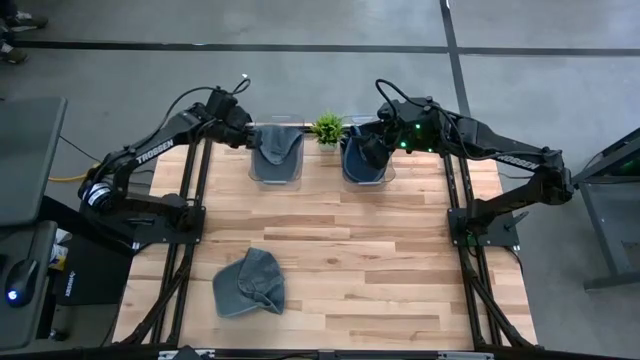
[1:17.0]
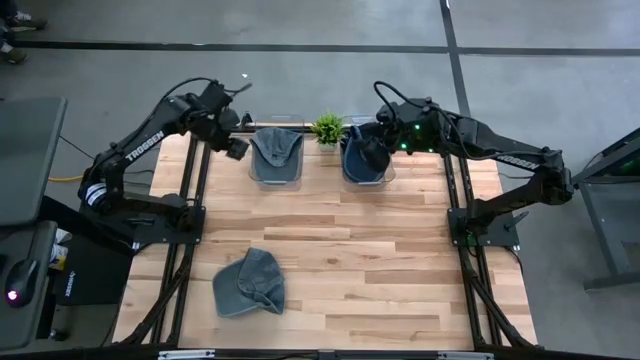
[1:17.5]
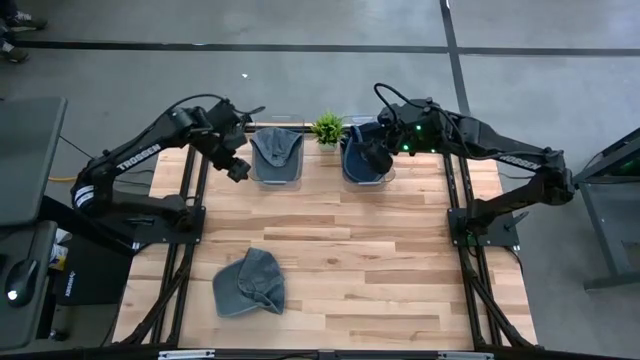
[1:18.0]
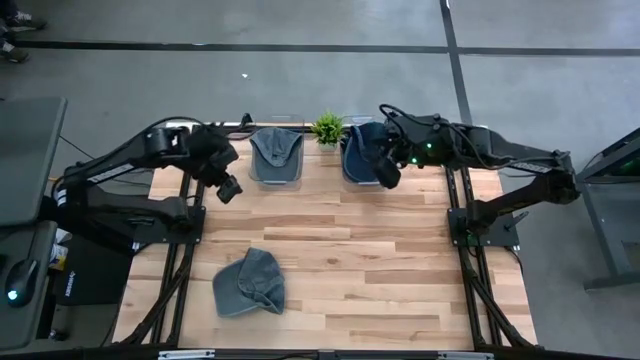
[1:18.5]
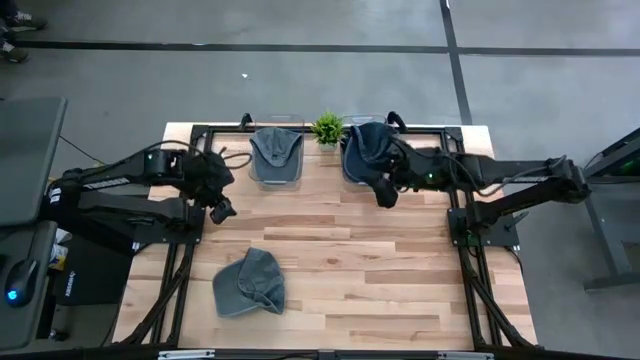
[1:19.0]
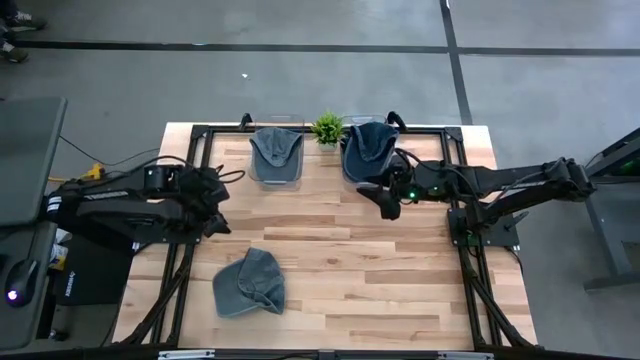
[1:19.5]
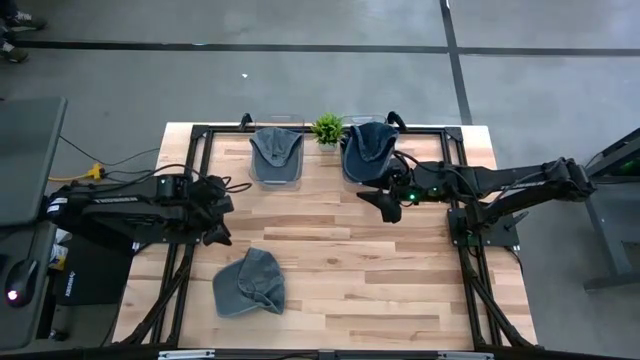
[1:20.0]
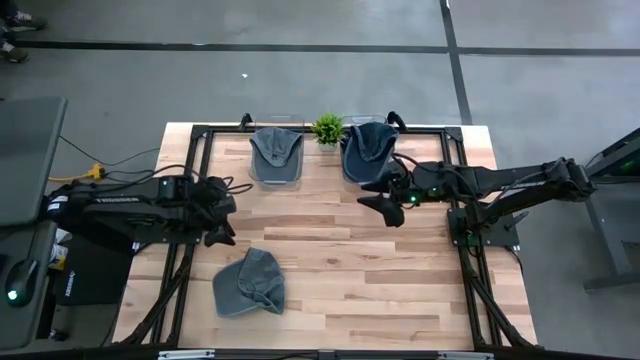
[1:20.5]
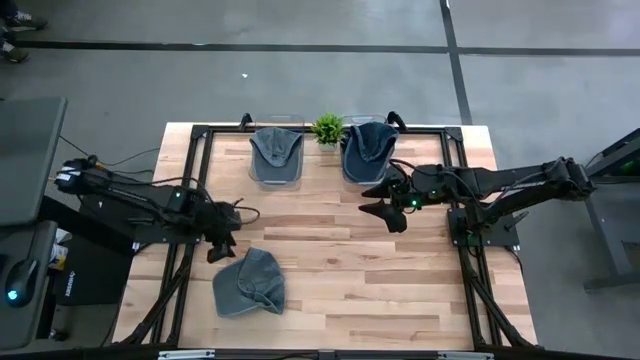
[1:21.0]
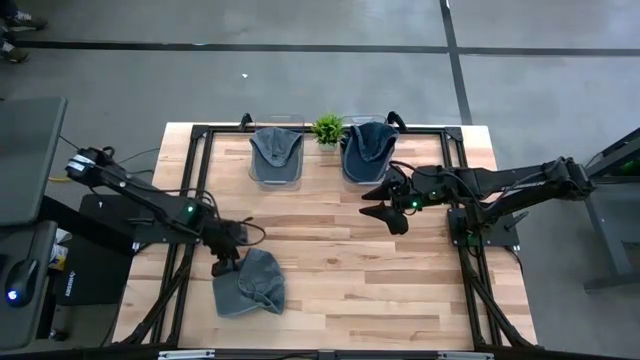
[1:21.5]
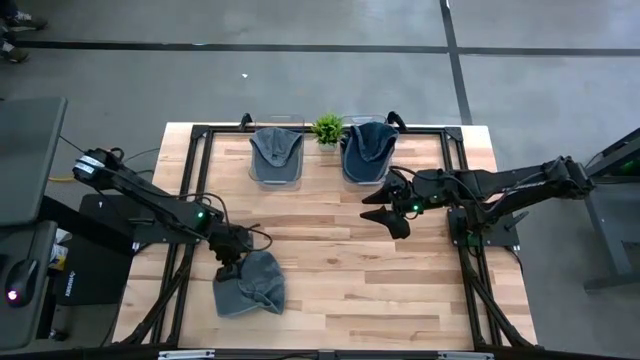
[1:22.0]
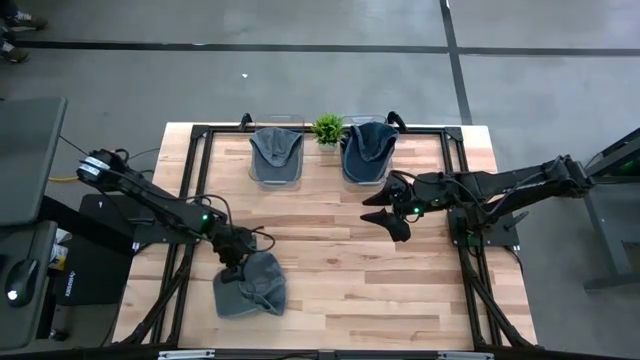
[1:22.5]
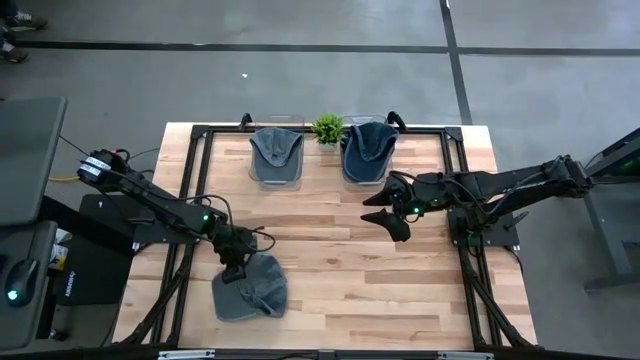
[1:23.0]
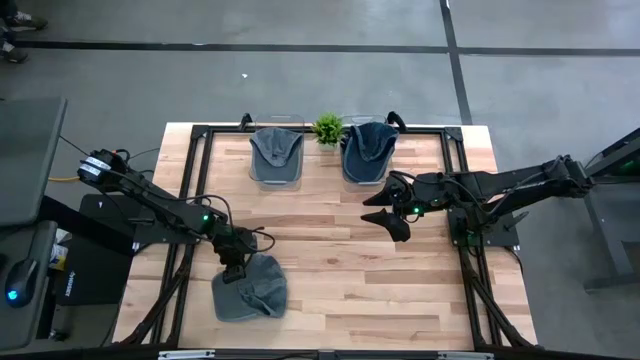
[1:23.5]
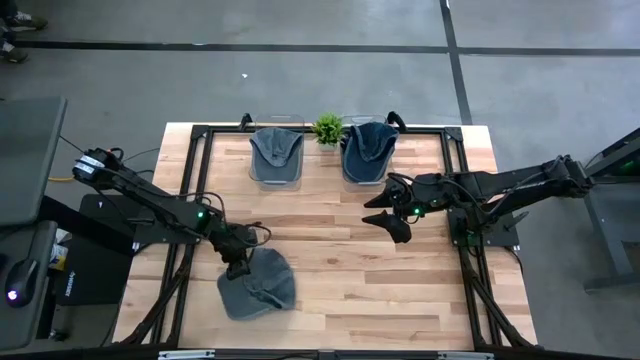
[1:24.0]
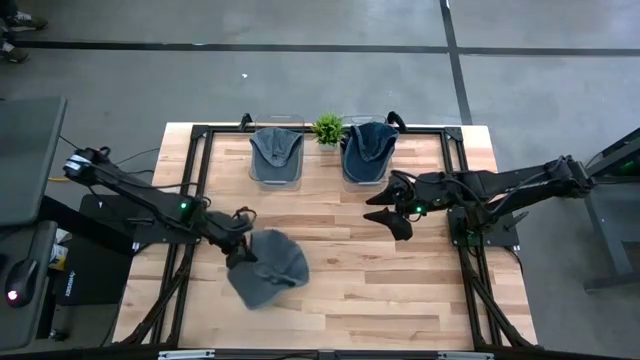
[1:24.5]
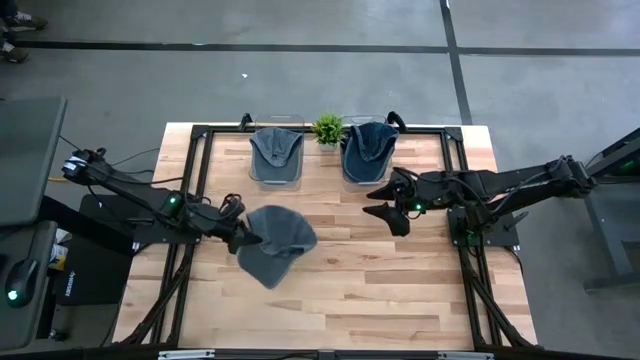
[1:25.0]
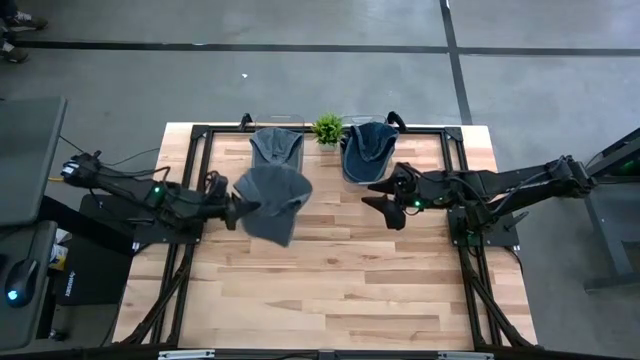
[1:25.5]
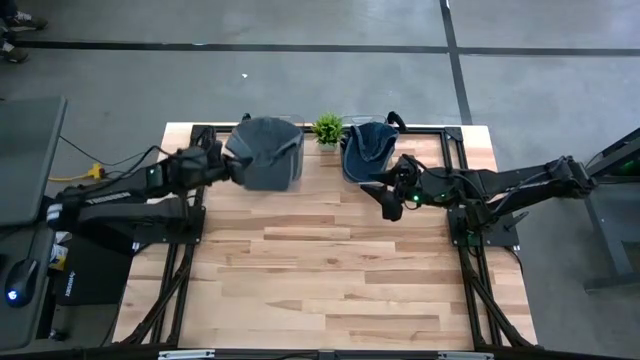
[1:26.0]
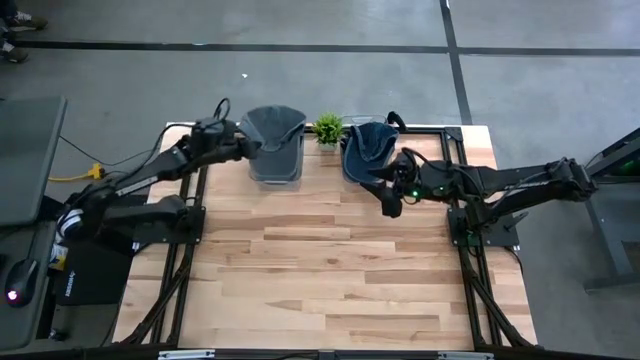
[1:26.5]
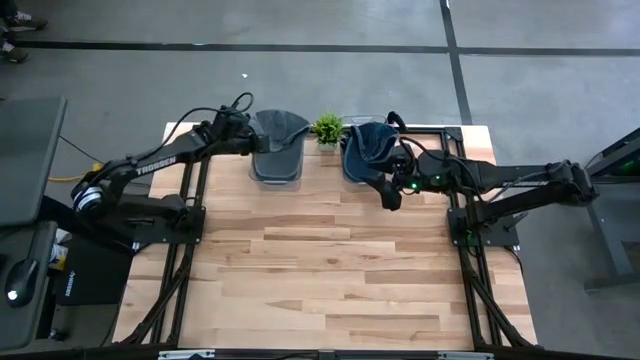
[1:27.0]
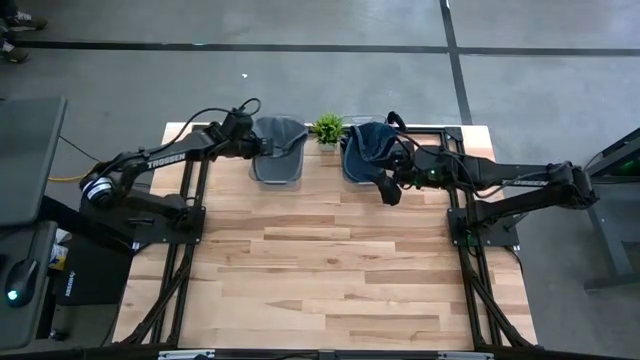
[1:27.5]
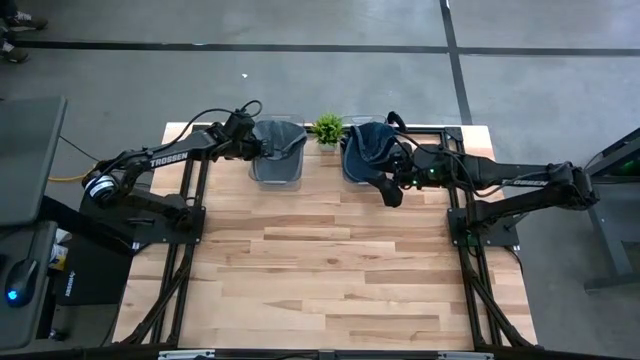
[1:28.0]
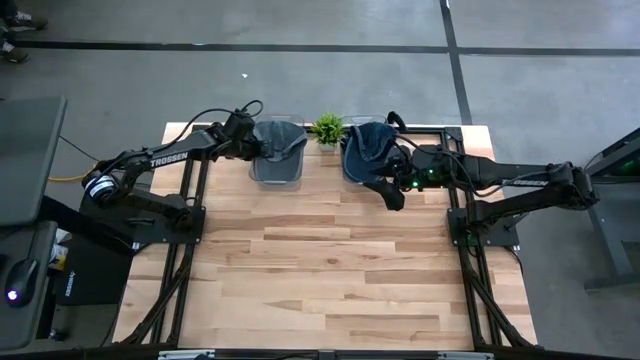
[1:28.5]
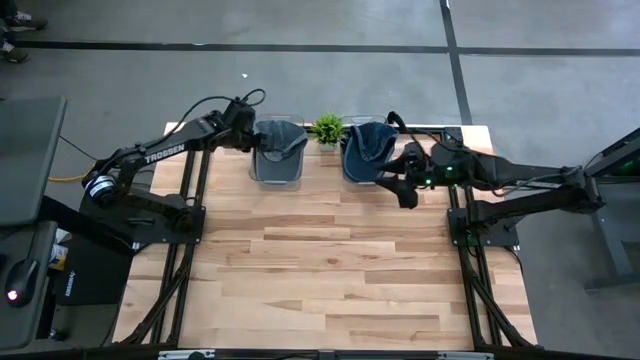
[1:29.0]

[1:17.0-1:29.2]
Task: Pick & Place hat
Put the gray cap into the left transparent bin

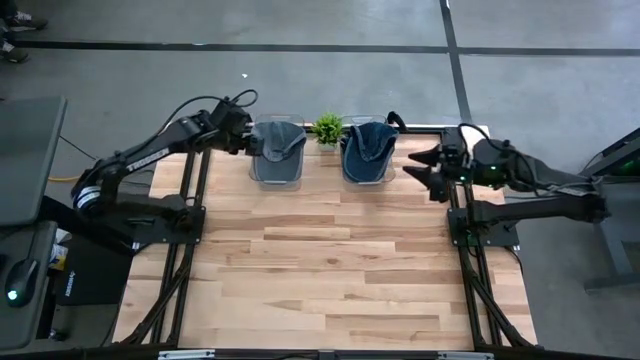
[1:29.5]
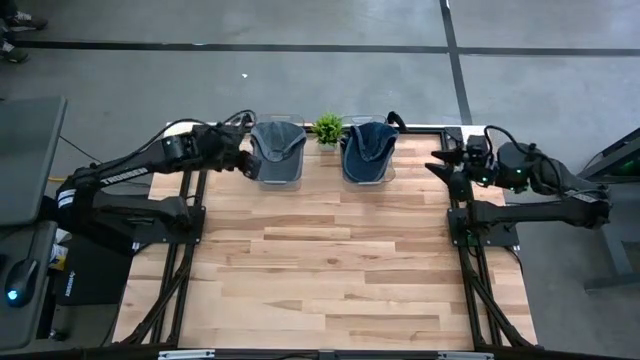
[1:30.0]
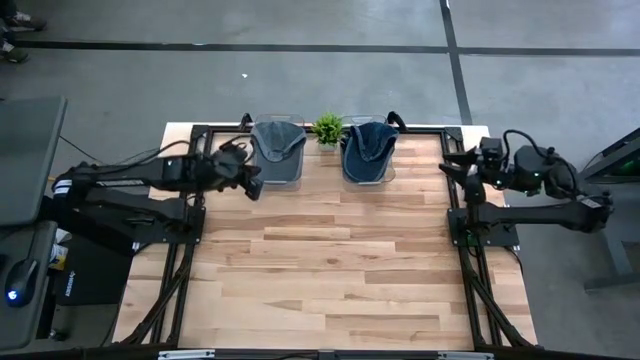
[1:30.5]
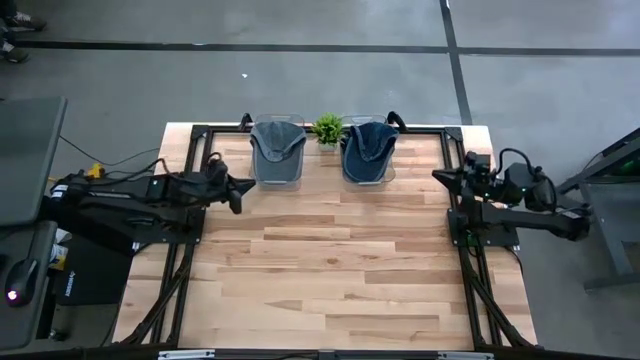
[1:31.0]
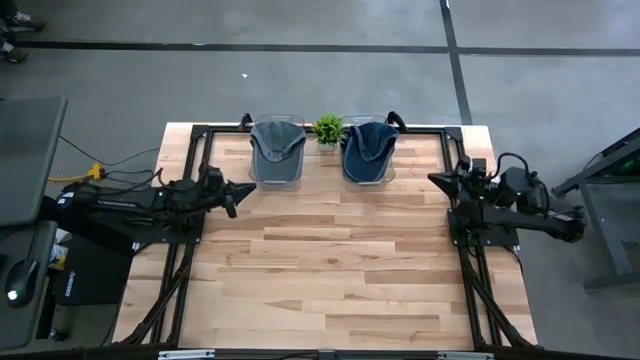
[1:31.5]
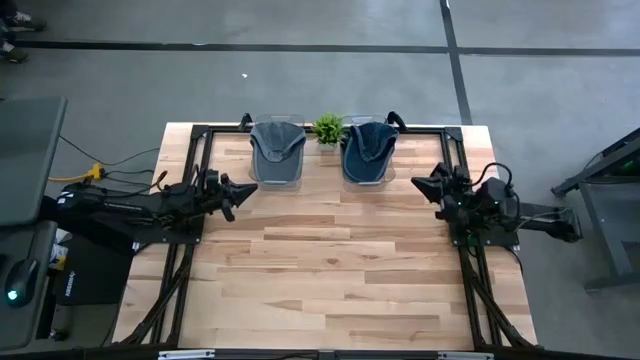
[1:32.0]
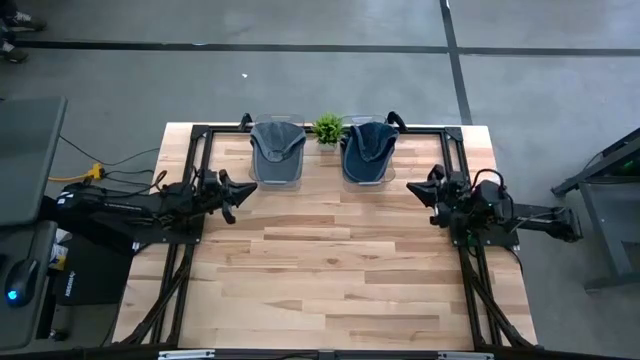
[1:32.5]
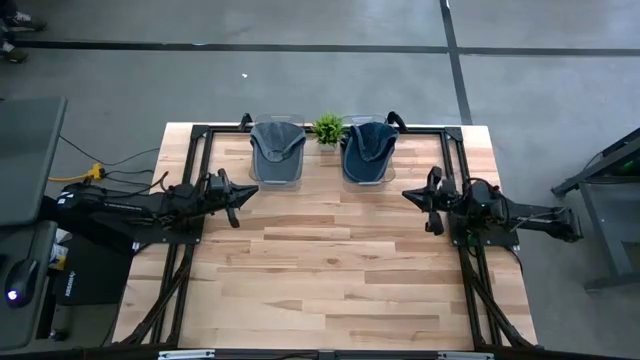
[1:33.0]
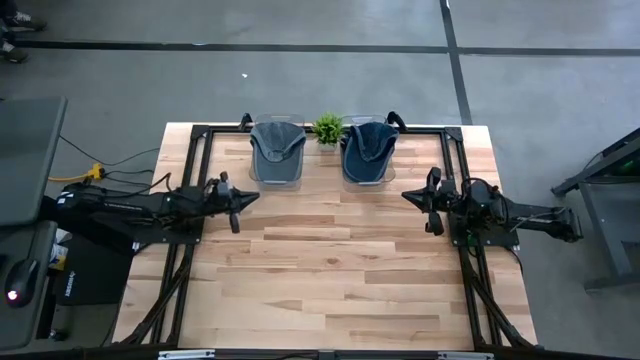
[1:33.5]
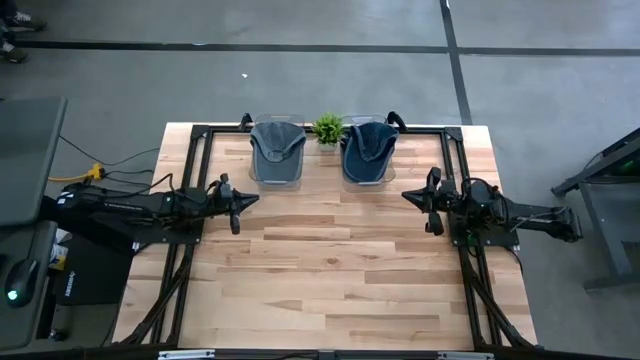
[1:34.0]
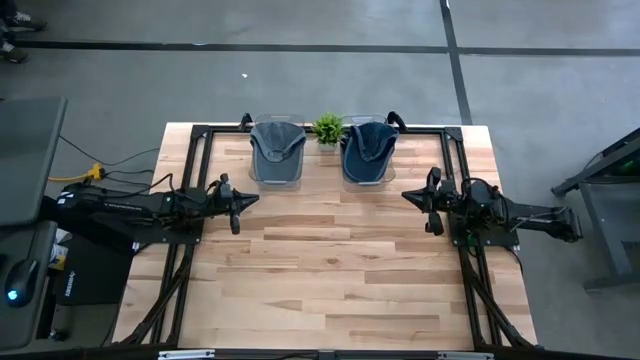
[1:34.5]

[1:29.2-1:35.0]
Return to Home Position

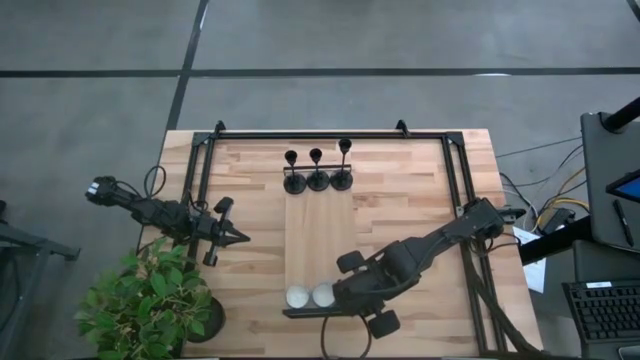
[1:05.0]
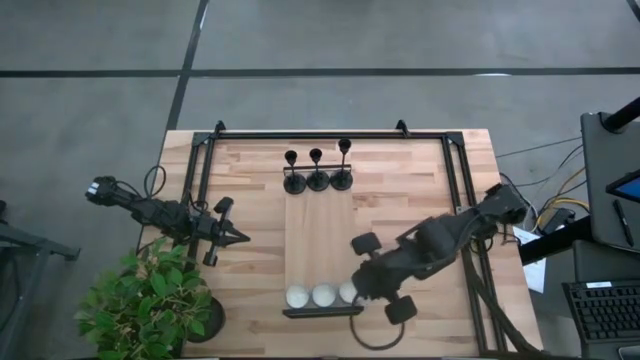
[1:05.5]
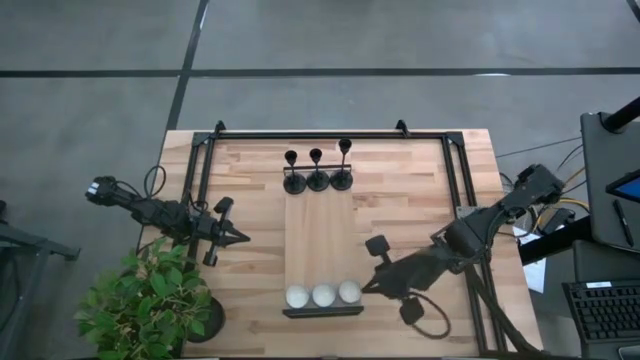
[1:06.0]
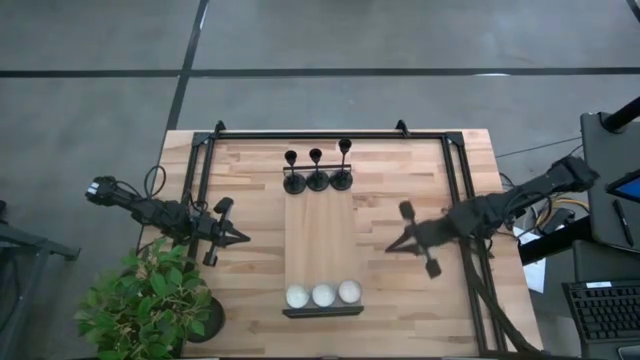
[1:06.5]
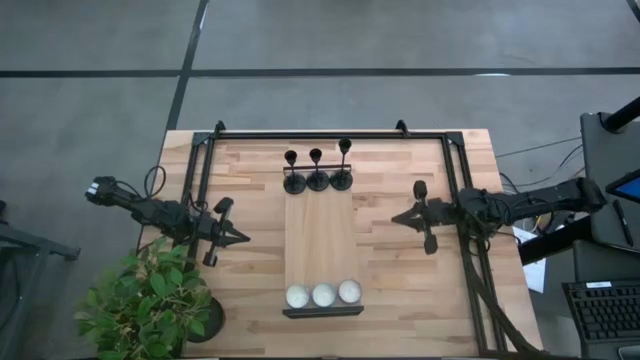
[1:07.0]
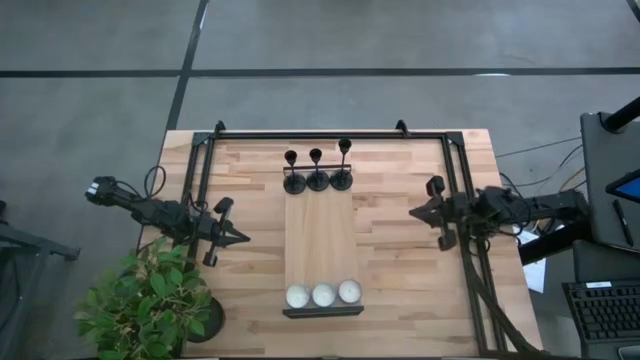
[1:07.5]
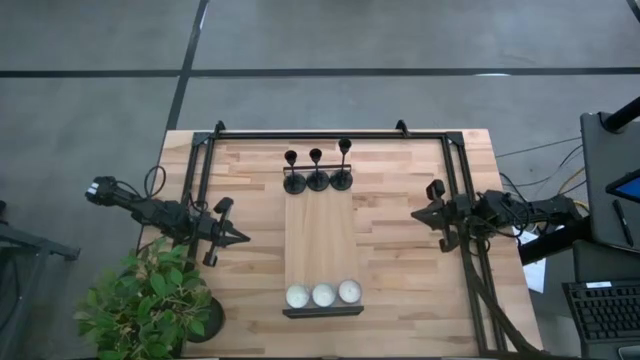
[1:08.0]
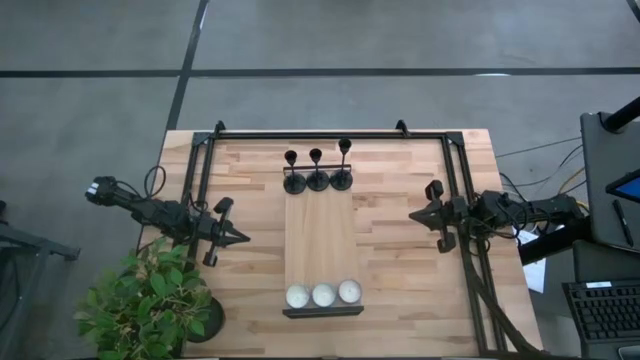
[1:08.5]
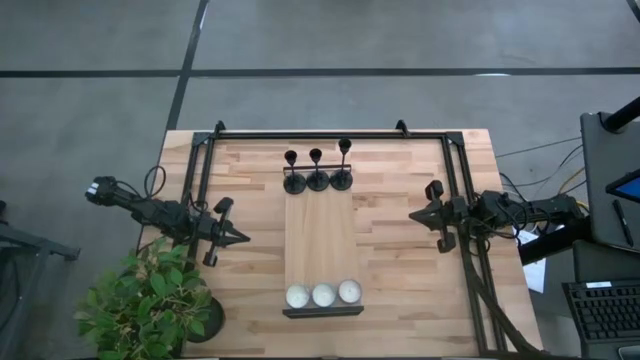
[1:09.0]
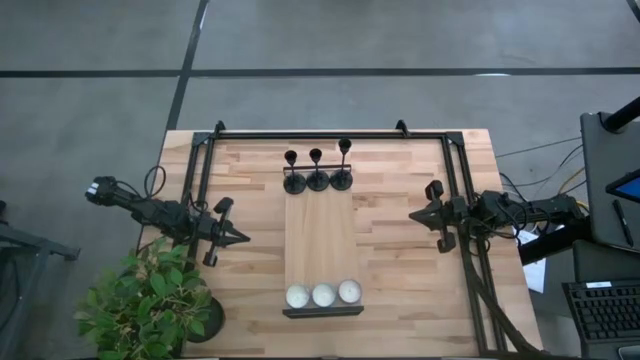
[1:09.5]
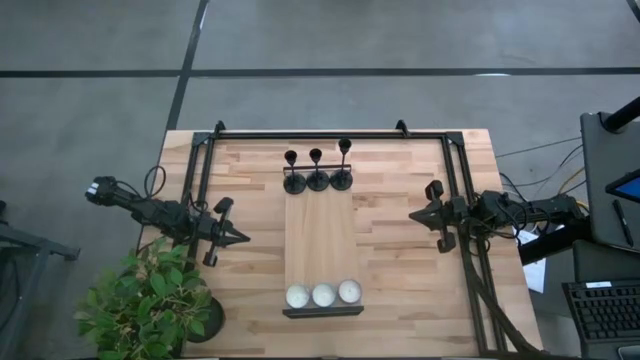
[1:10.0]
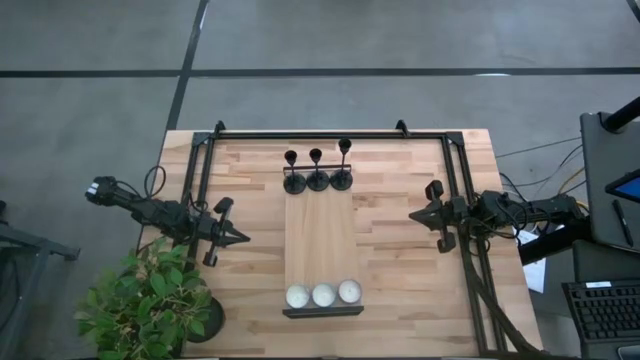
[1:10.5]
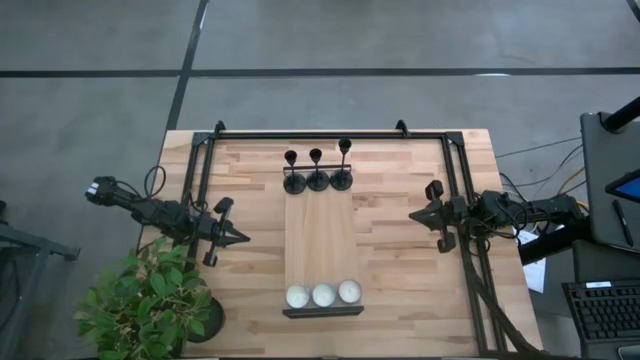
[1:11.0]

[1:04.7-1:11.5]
Task: Pick & Place candle stick holders
Return to Home Position
